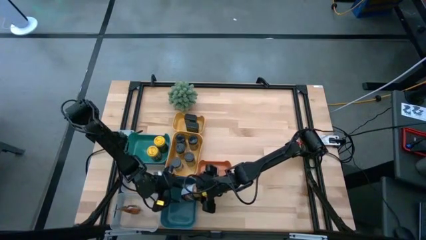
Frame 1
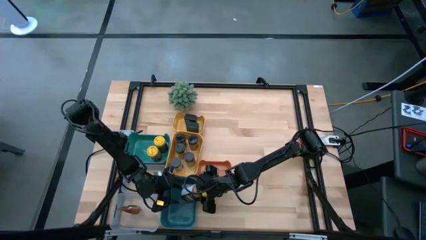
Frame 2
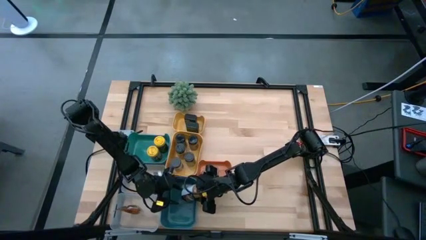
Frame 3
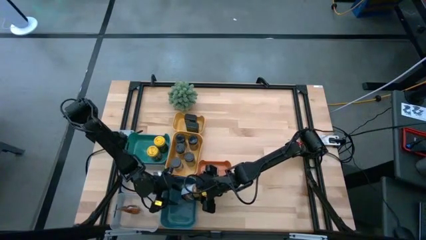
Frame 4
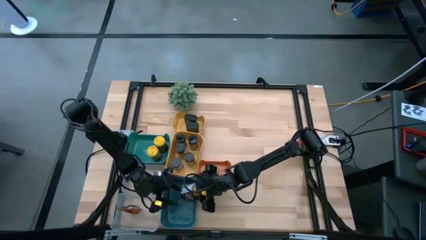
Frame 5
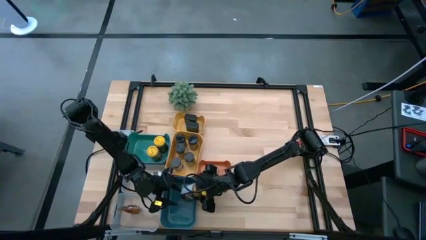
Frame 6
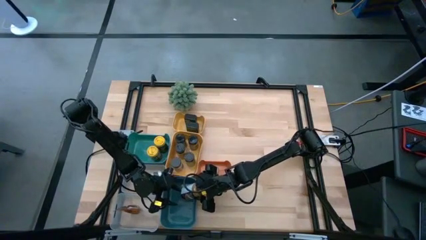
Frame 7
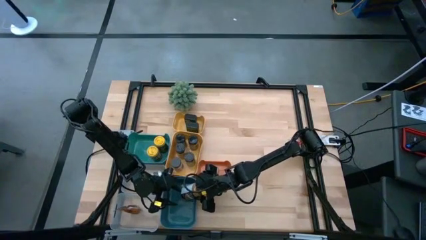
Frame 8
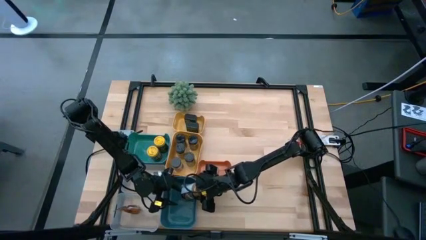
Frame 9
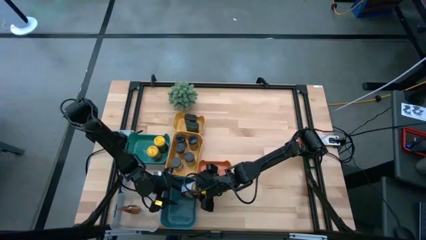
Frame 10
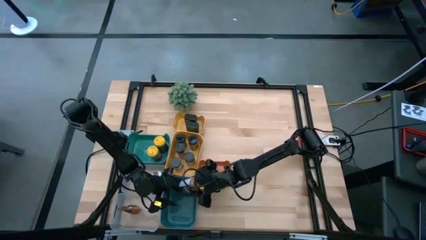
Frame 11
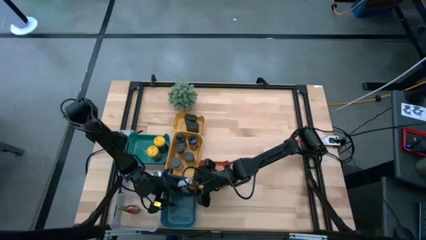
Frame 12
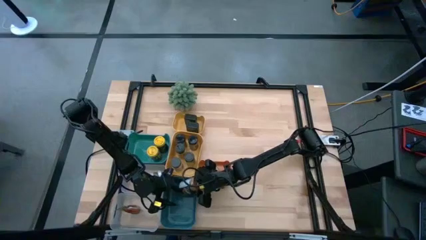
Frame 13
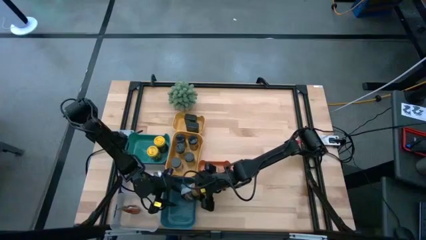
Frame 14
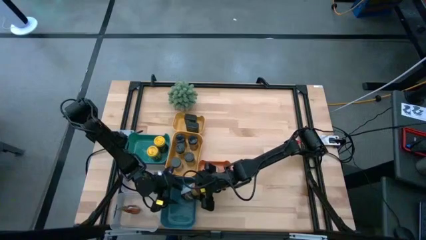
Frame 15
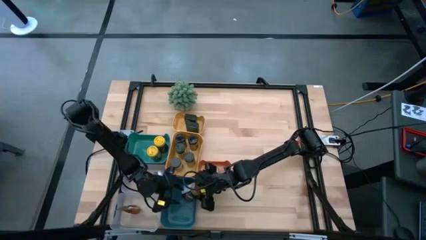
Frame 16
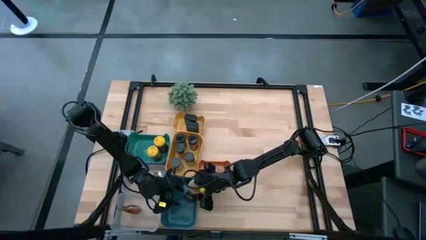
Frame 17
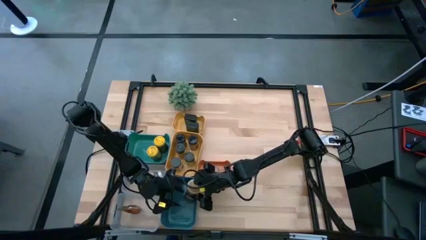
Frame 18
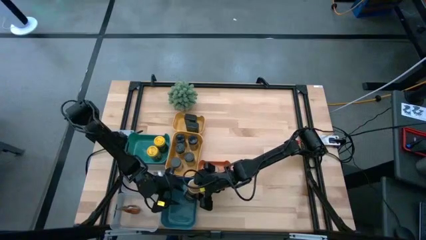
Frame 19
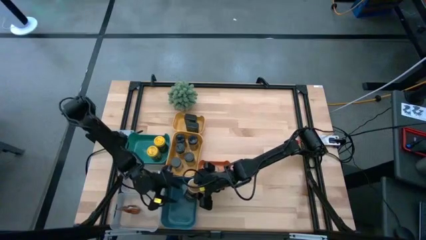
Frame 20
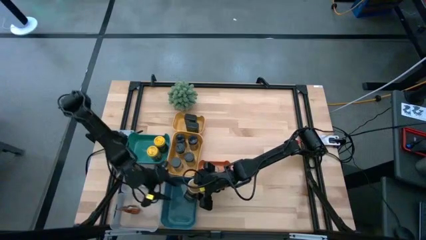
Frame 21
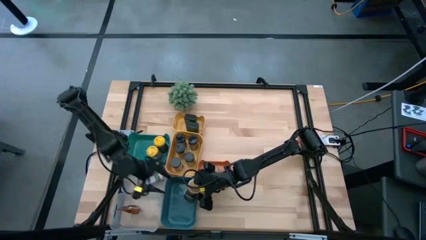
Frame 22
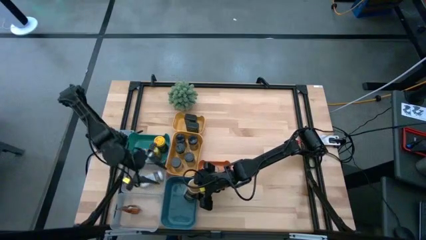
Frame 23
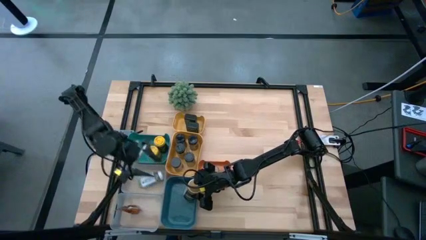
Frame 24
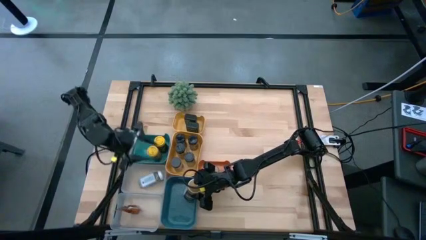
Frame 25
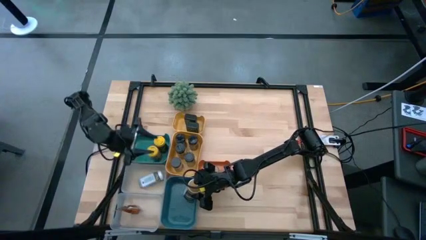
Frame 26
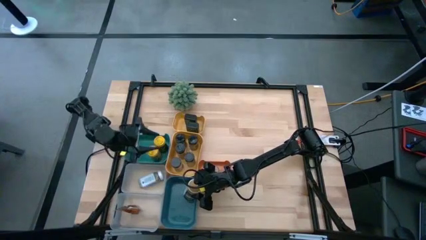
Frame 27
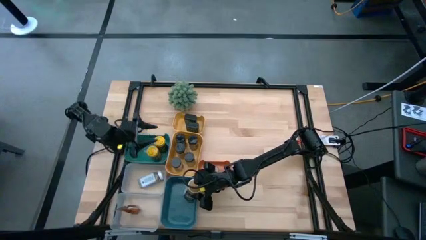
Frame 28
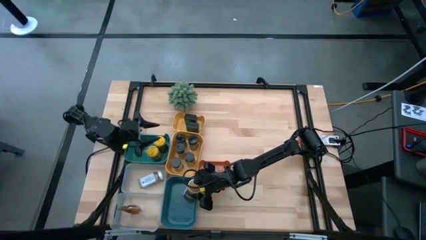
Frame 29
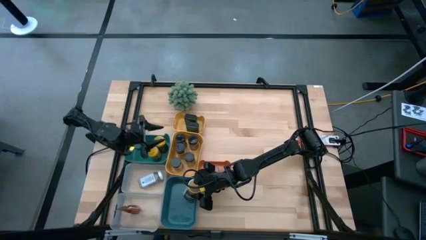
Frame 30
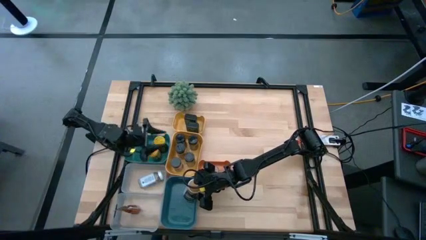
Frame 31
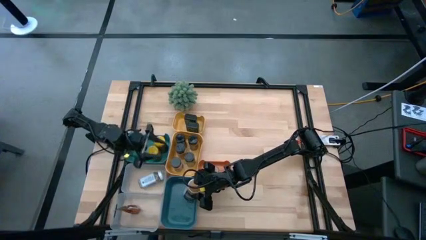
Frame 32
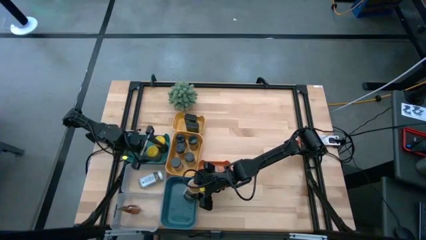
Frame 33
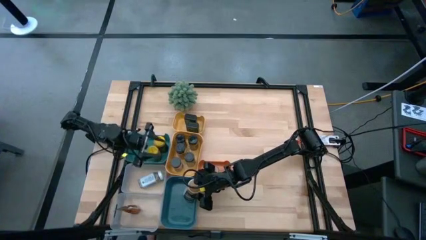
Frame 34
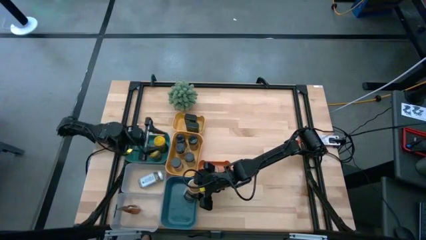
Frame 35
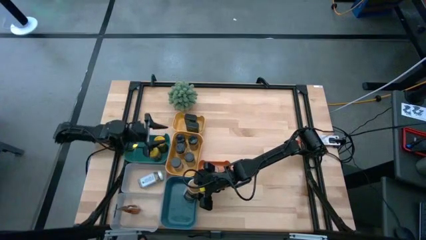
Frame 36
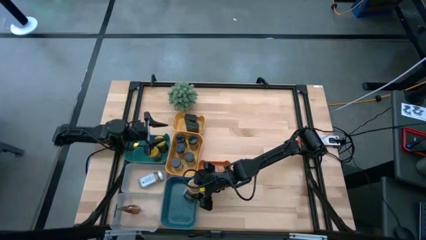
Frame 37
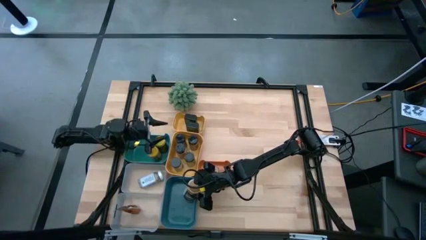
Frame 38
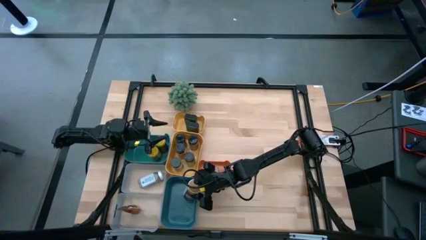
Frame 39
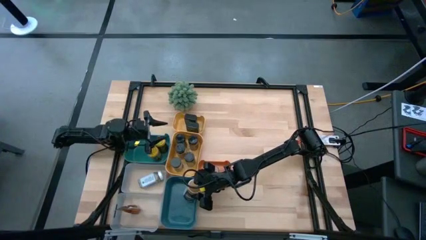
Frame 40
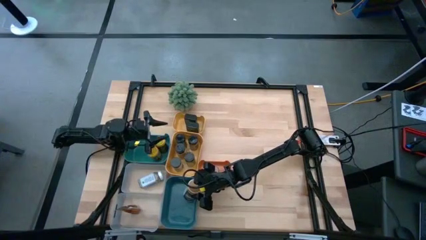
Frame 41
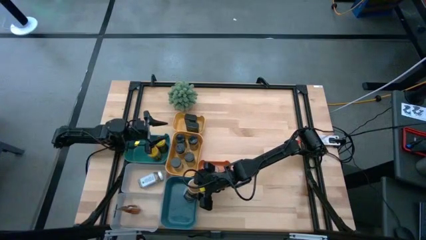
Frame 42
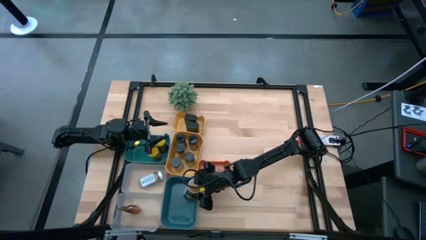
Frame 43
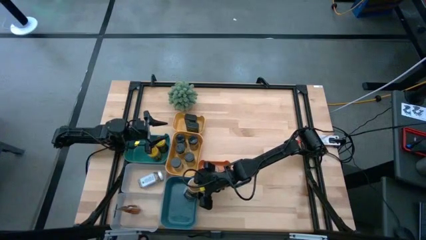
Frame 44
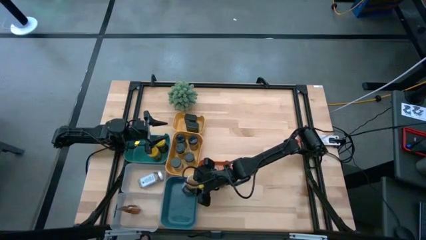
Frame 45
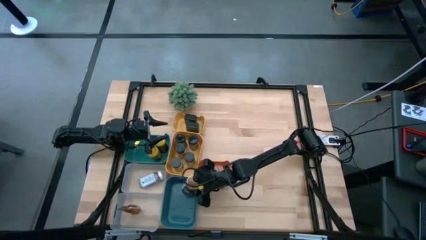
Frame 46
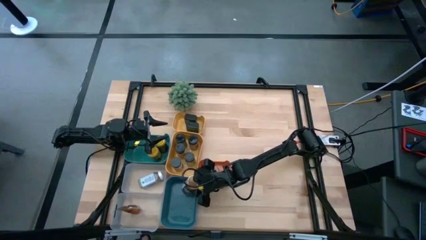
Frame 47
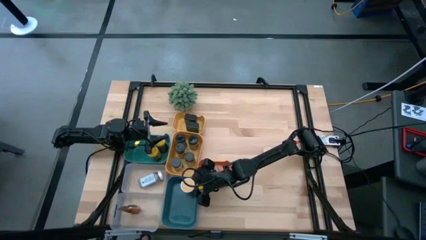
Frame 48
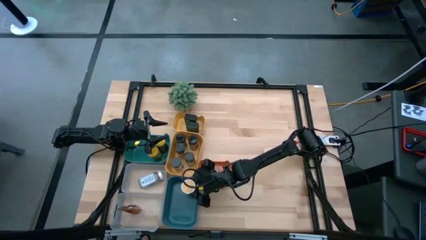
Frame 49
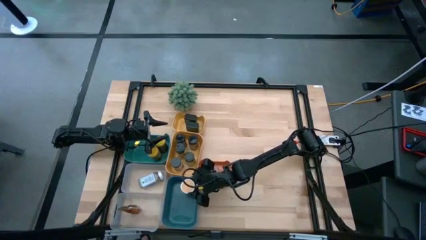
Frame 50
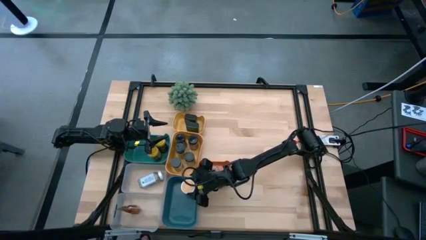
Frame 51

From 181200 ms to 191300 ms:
Task: Sort spices by type
Put the gold seasoning bottle into the blue bin

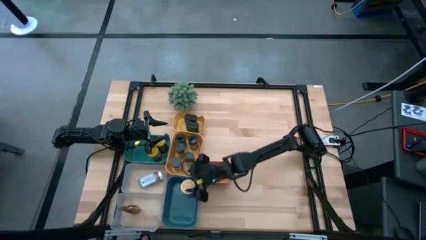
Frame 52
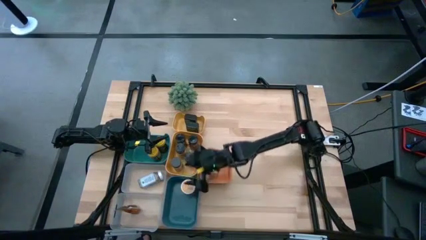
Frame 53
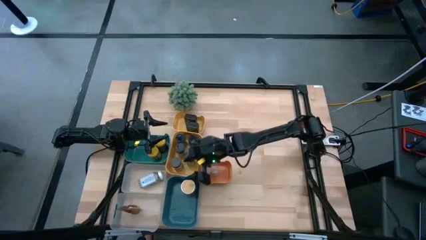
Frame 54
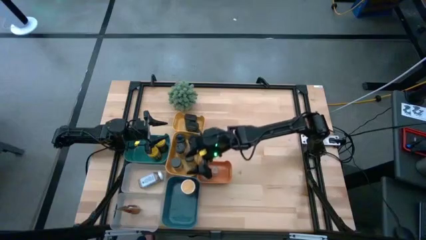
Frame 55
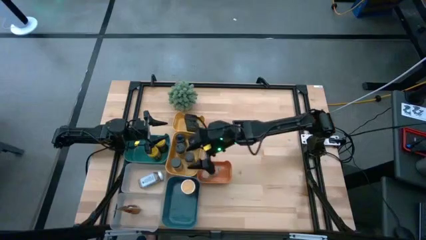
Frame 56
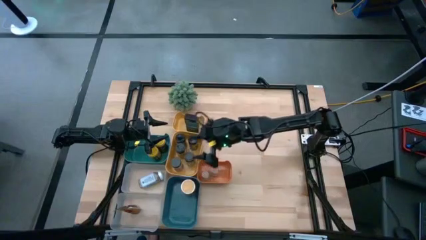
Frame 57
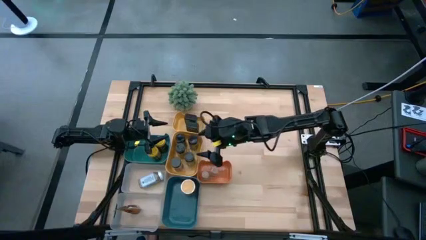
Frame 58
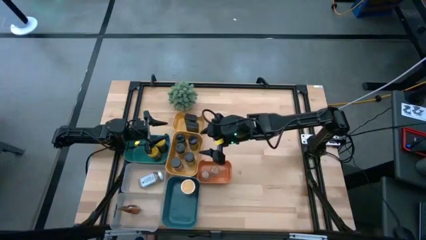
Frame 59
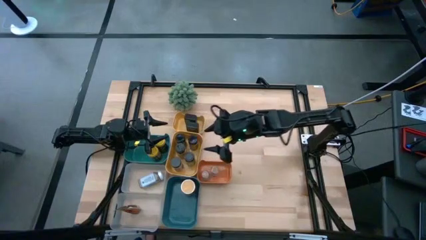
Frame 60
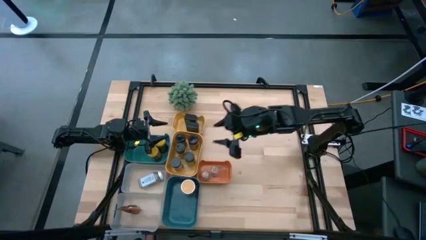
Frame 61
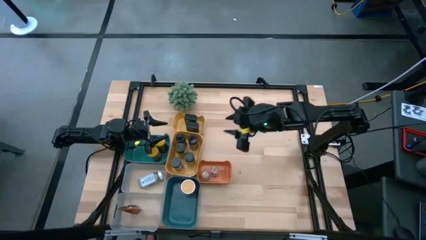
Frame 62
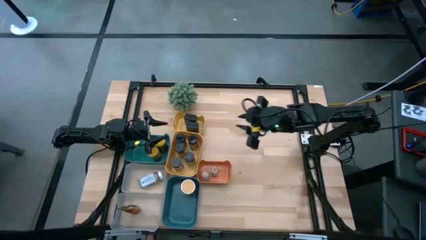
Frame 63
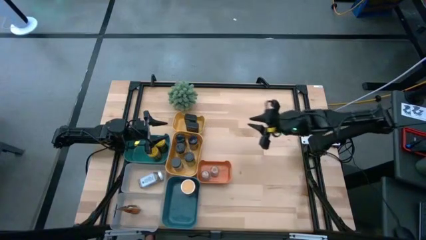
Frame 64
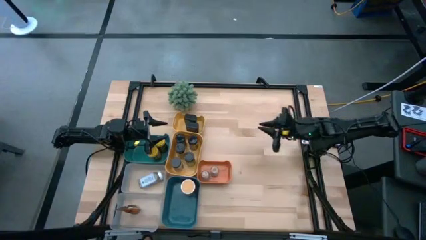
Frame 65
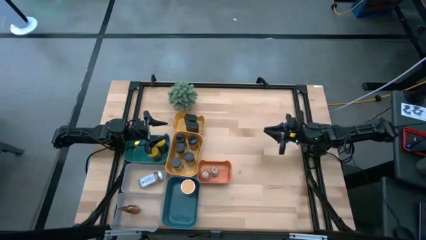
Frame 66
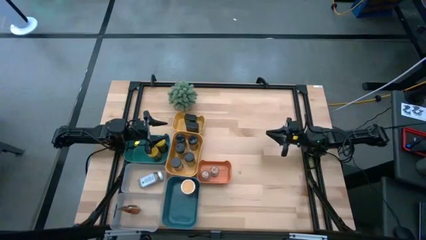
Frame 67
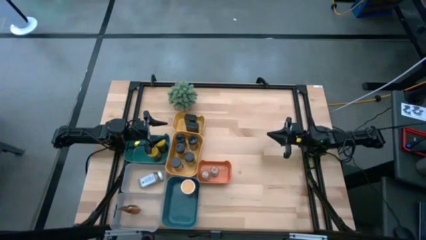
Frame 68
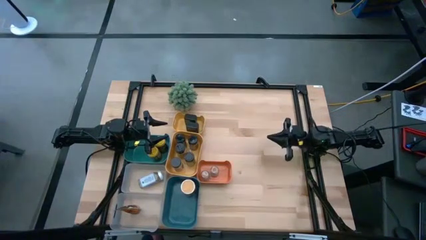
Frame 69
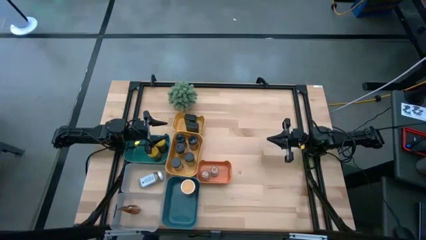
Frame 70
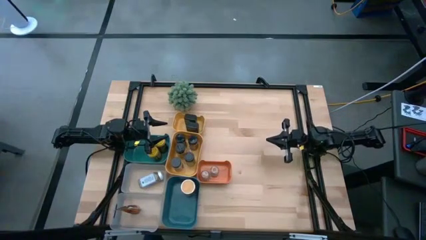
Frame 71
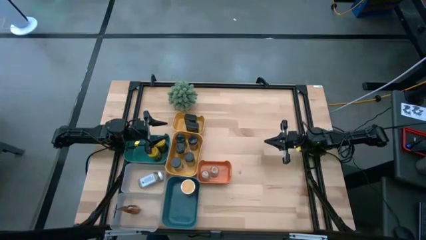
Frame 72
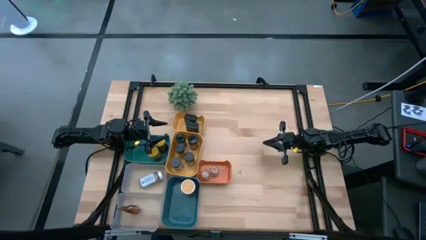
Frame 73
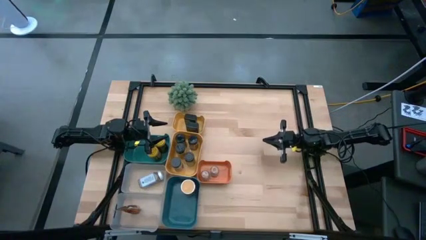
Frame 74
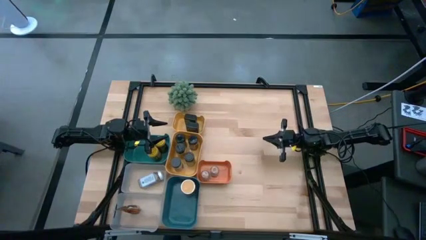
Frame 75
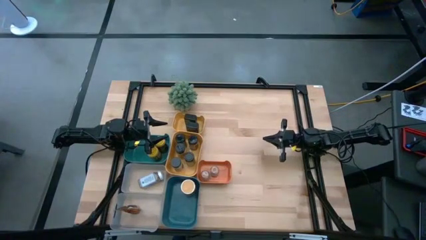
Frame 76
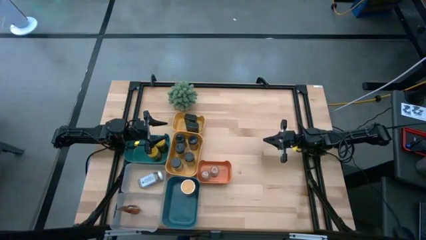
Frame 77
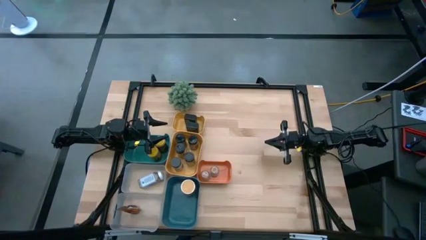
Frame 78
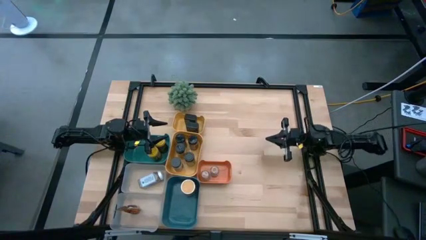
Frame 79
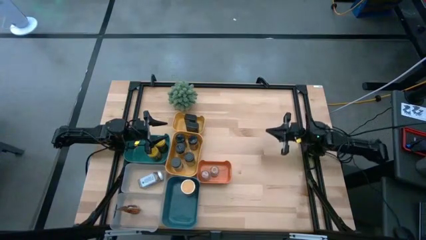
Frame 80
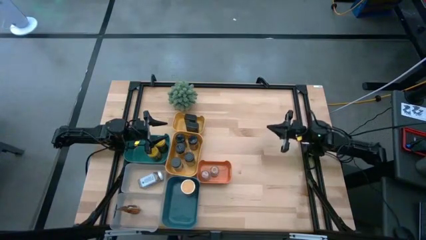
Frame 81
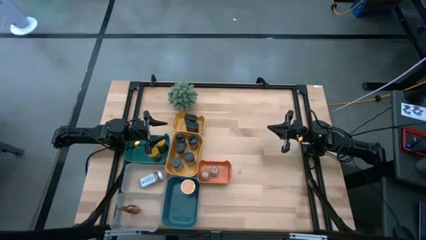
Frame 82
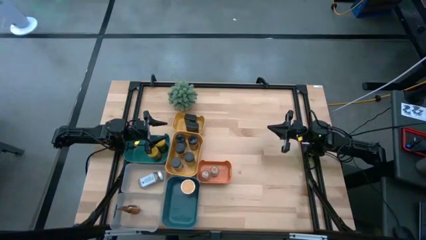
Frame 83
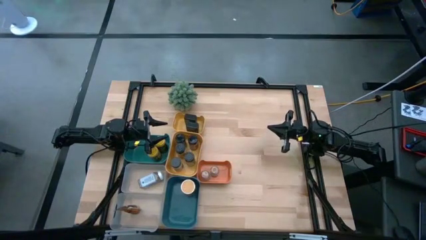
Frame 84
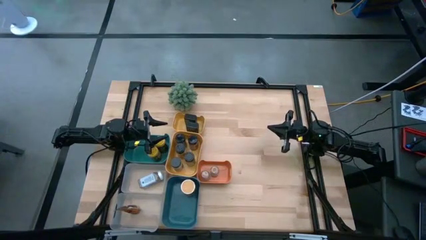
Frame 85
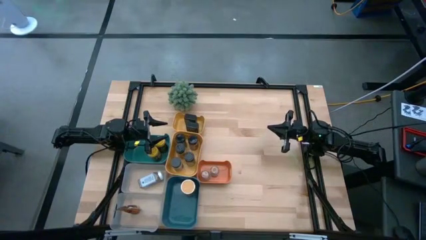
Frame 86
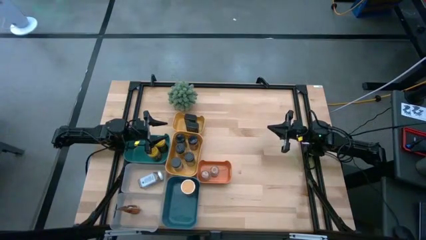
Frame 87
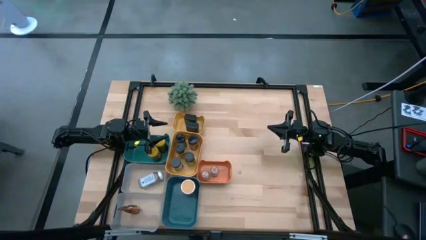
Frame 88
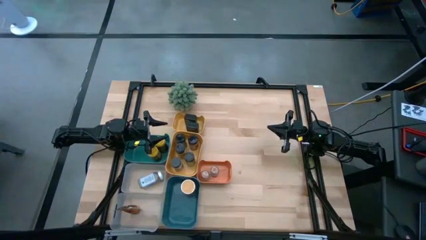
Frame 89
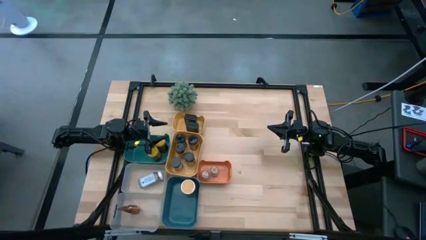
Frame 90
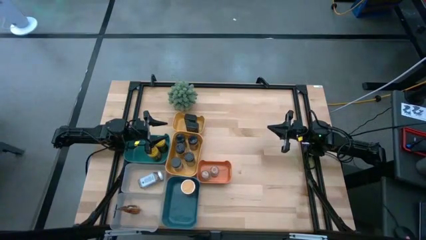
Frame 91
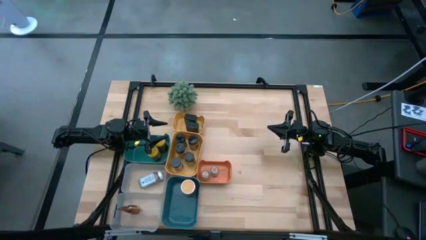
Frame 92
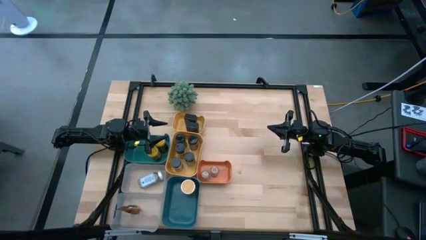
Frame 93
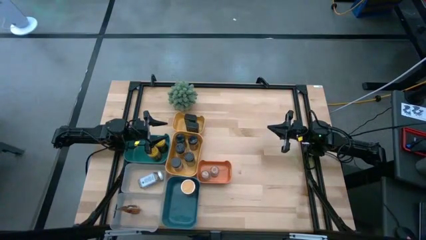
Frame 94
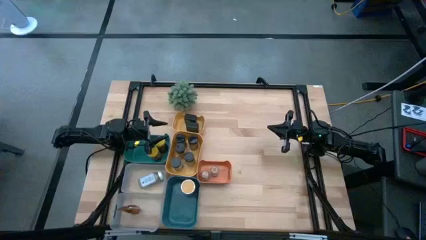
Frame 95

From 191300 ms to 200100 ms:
Return to Home Position
